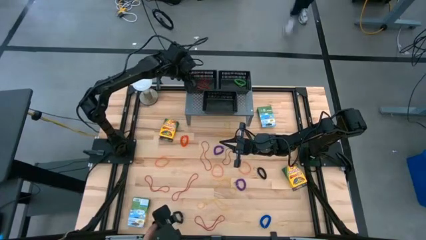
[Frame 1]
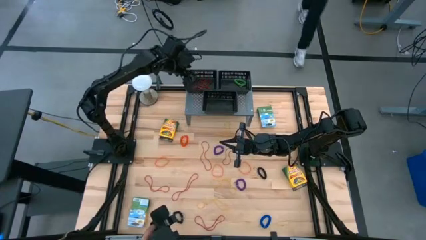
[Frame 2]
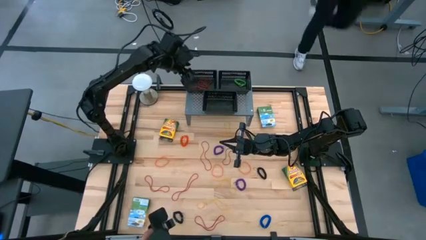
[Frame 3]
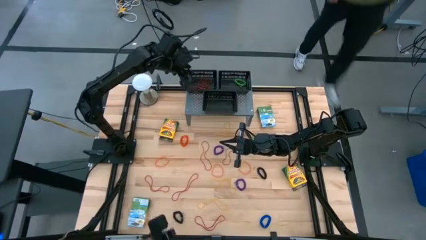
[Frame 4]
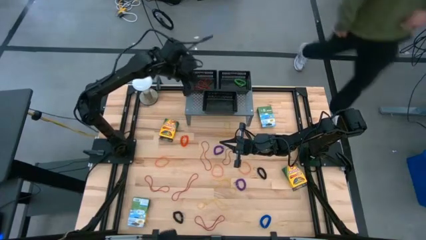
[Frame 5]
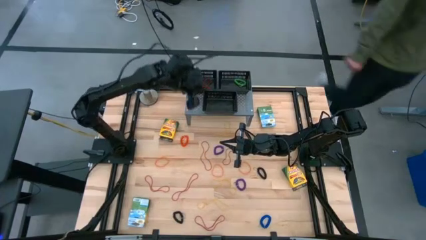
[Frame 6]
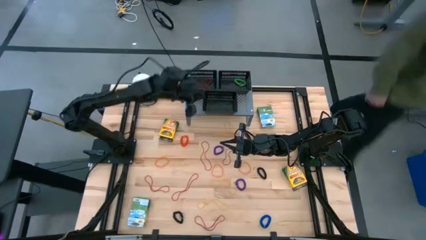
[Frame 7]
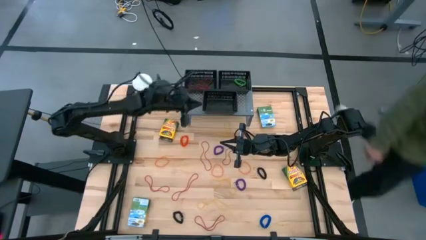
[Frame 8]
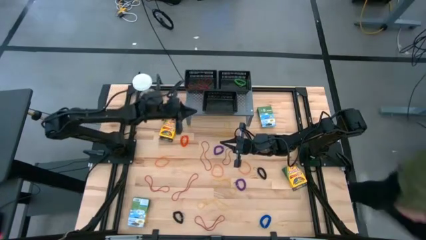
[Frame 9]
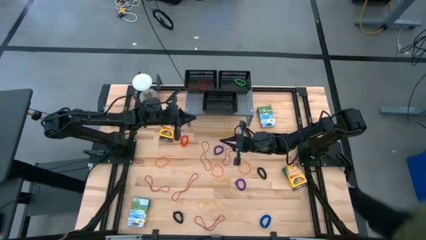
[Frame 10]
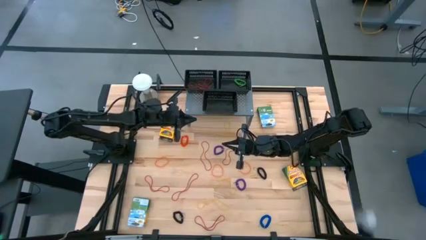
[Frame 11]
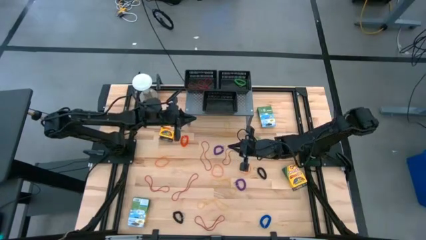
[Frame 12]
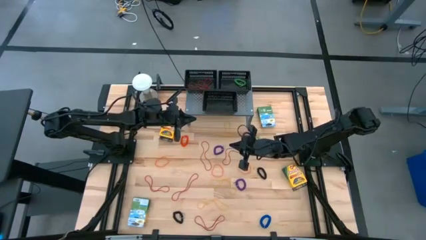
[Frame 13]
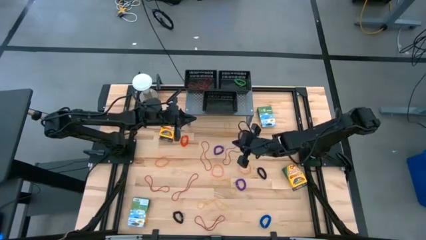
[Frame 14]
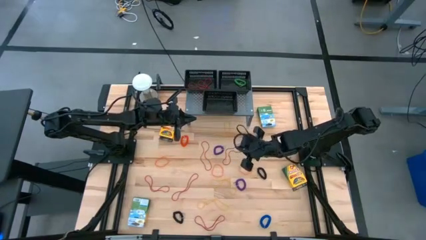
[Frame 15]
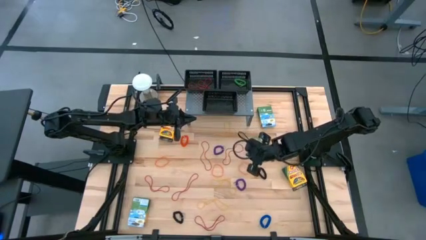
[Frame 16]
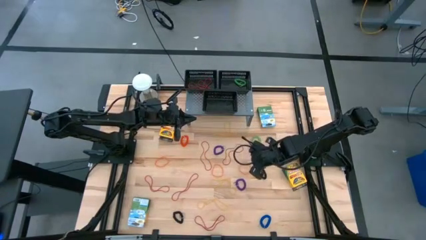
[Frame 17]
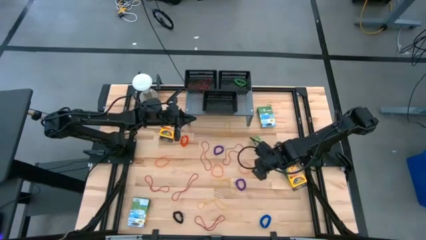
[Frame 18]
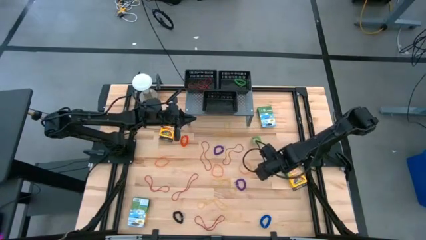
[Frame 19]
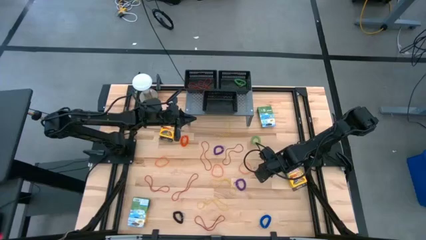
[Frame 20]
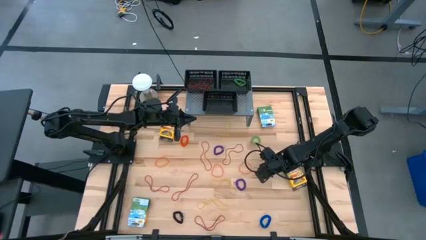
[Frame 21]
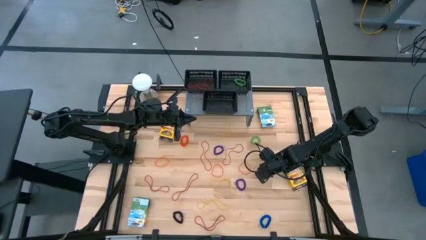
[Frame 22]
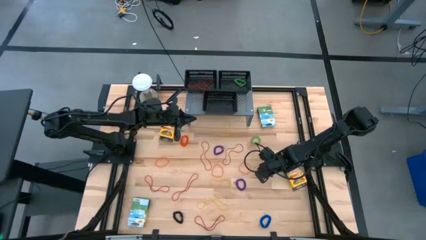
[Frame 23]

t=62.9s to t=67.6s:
Task: Pick & Place Office Desk Supplies
Put the black spring keychain into the top right black basket on the shelf

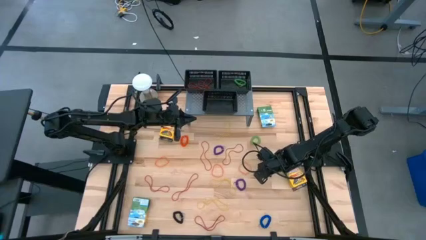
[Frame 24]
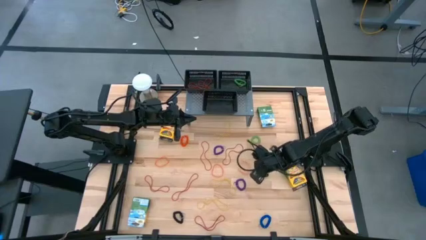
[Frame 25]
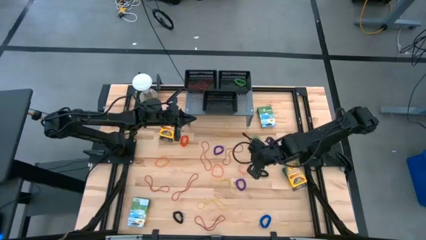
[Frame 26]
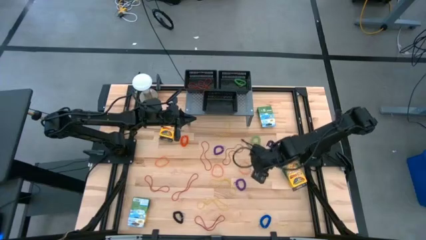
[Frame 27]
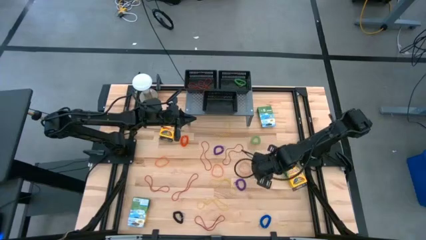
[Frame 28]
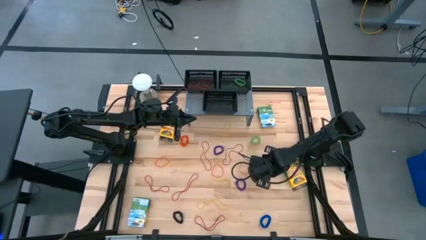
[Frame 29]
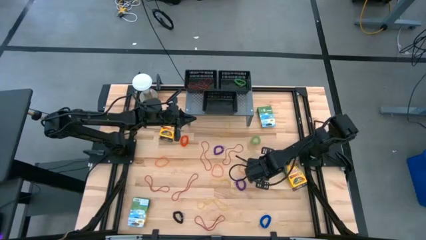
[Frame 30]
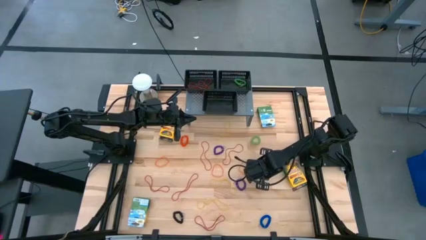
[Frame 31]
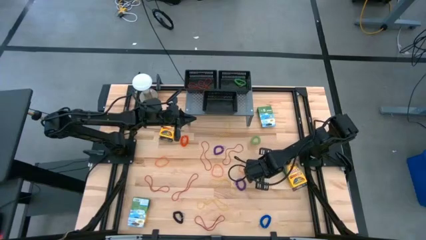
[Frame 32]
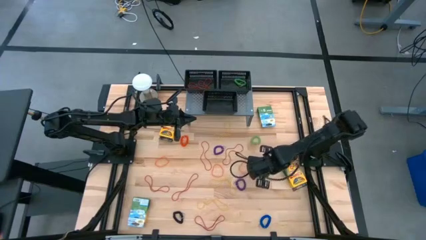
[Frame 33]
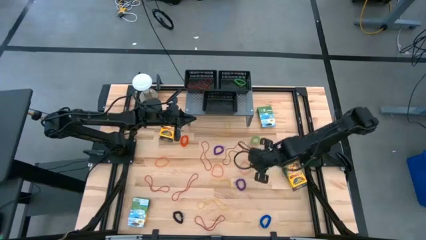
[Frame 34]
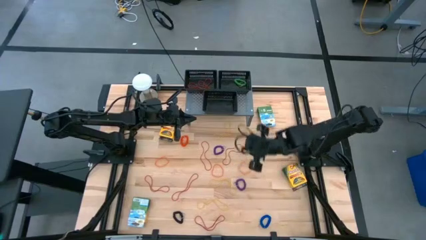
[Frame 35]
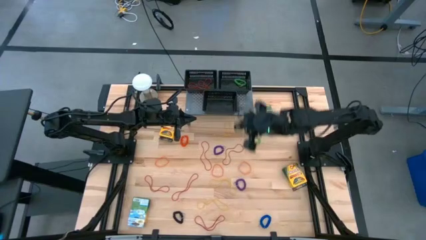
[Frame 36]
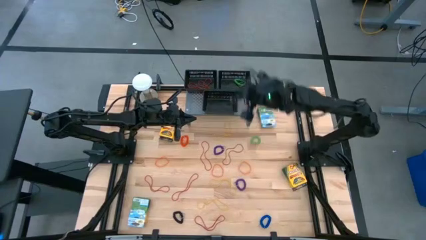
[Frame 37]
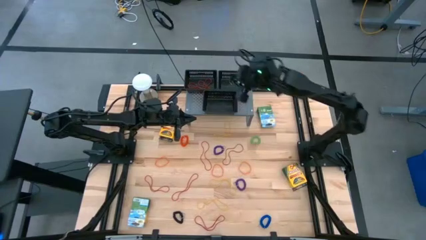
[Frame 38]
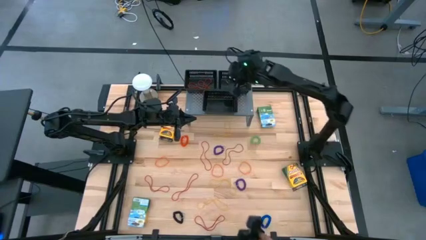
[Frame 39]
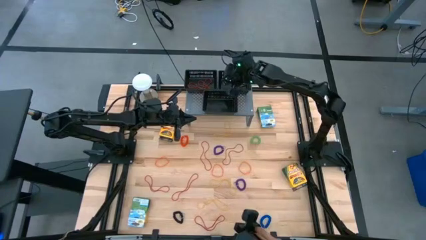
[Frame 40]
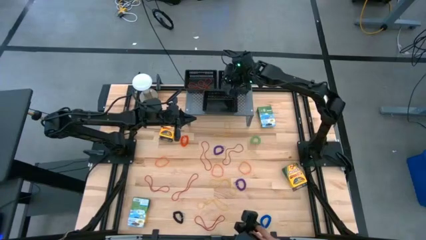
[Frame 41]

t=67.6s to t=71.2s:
Put the black spring keychain into the top right black basket on the shelf

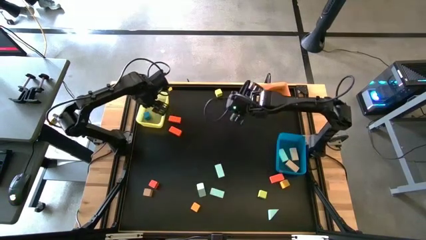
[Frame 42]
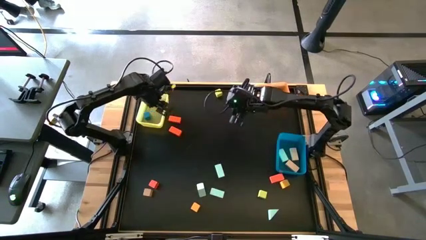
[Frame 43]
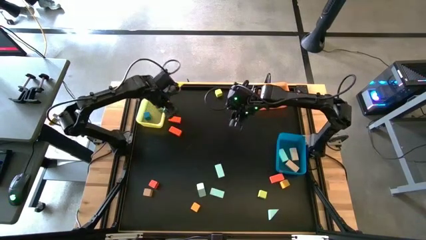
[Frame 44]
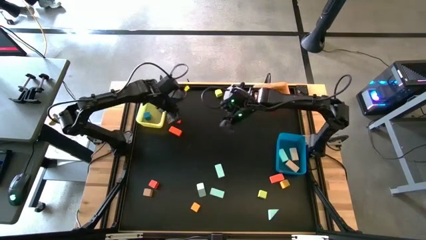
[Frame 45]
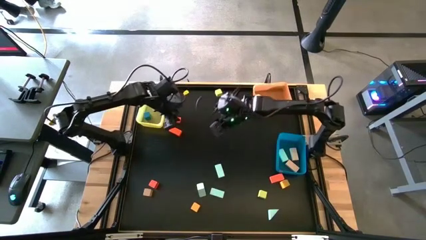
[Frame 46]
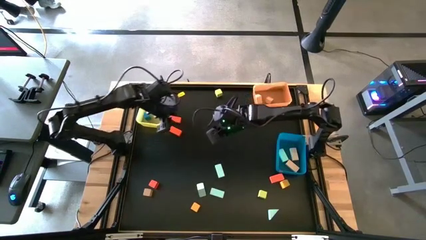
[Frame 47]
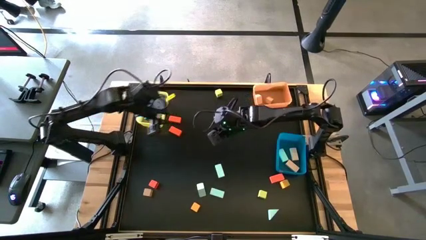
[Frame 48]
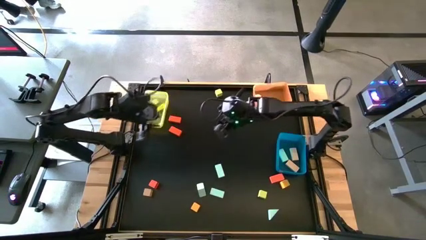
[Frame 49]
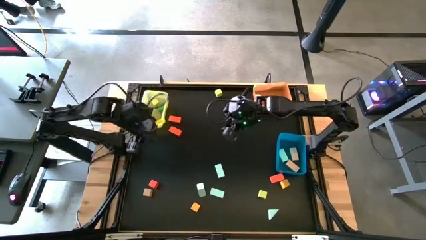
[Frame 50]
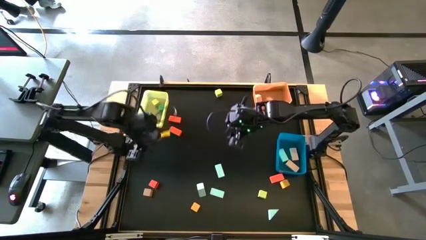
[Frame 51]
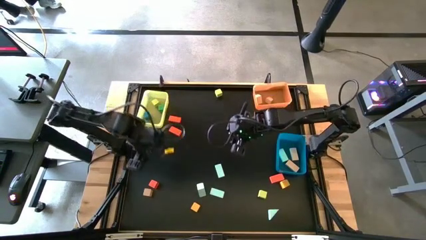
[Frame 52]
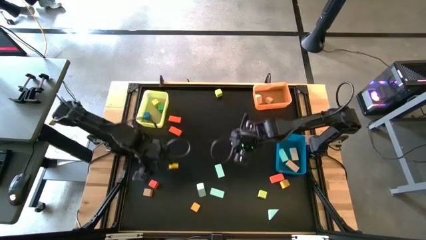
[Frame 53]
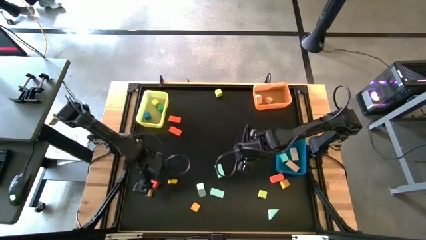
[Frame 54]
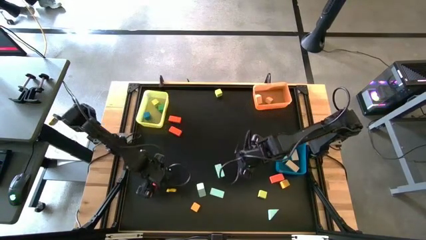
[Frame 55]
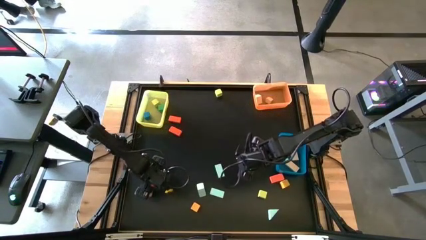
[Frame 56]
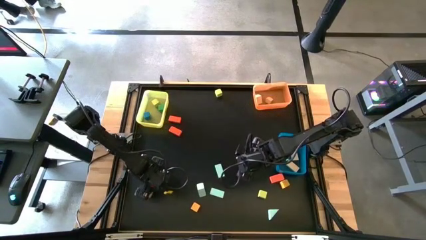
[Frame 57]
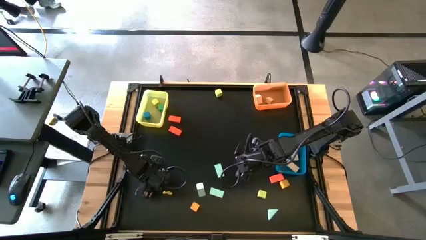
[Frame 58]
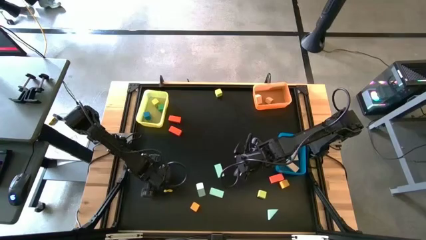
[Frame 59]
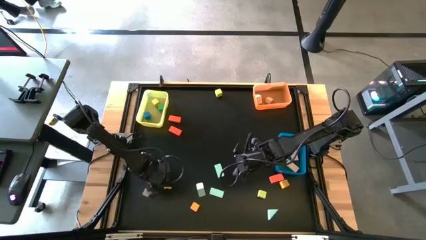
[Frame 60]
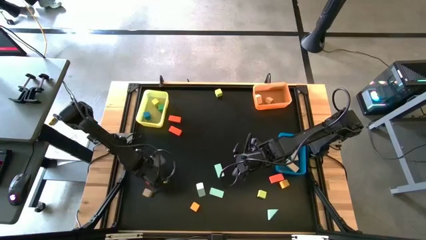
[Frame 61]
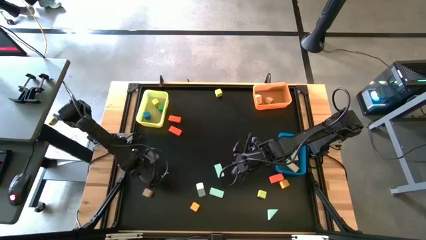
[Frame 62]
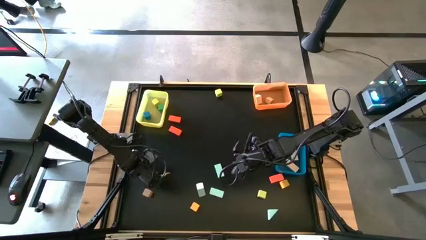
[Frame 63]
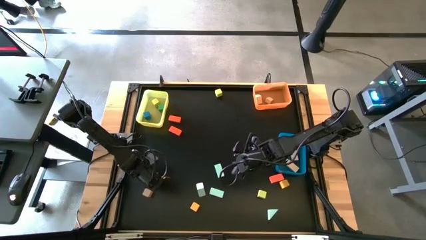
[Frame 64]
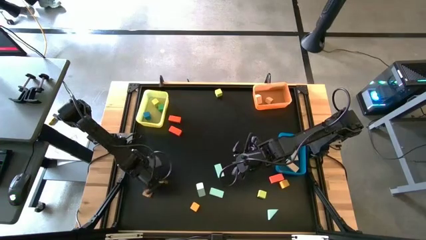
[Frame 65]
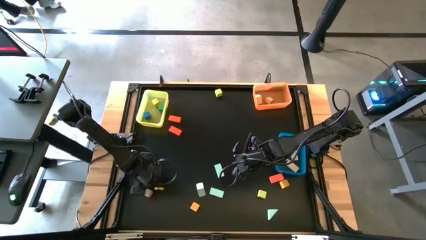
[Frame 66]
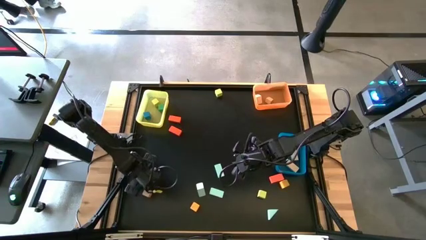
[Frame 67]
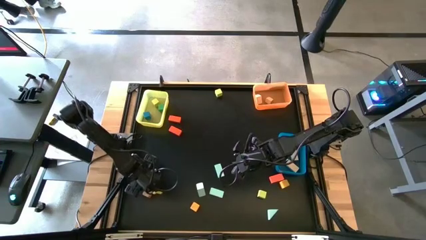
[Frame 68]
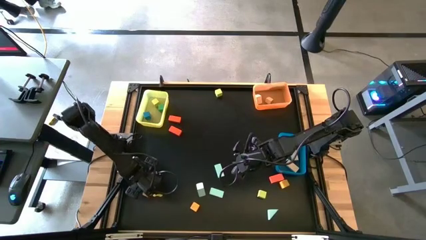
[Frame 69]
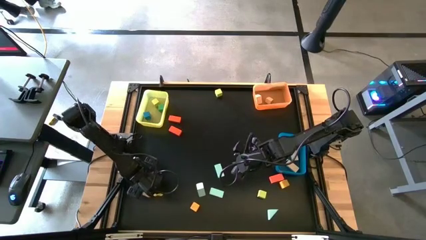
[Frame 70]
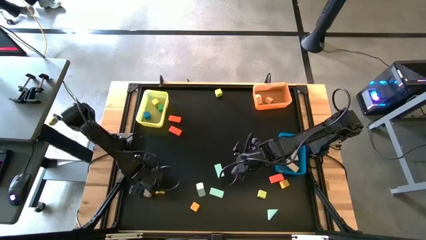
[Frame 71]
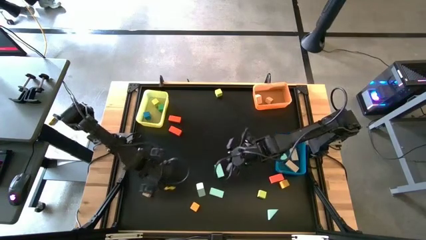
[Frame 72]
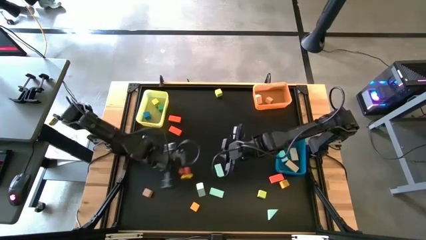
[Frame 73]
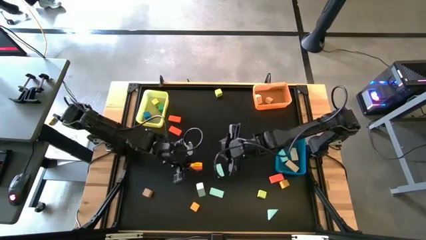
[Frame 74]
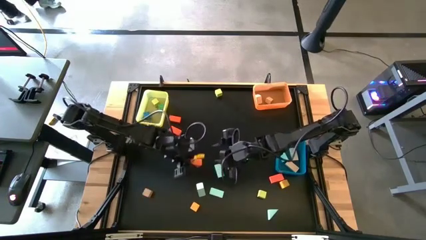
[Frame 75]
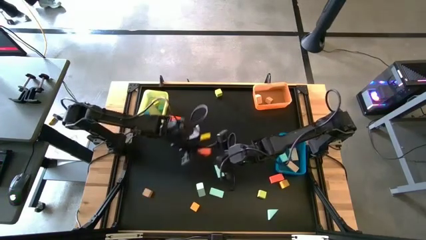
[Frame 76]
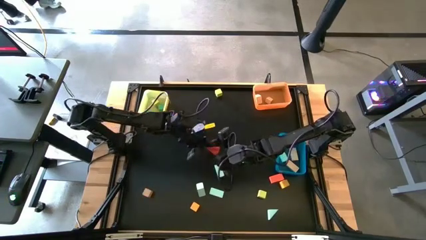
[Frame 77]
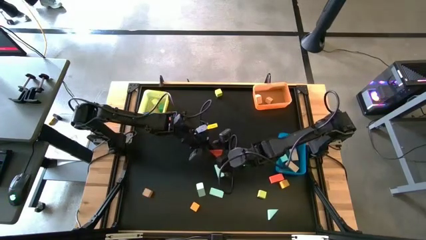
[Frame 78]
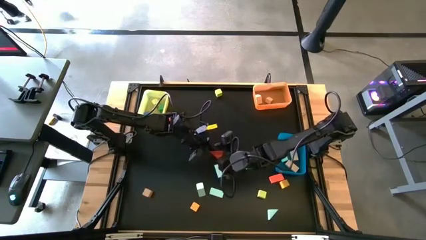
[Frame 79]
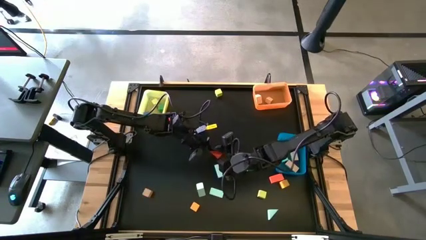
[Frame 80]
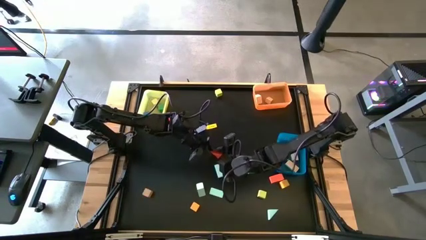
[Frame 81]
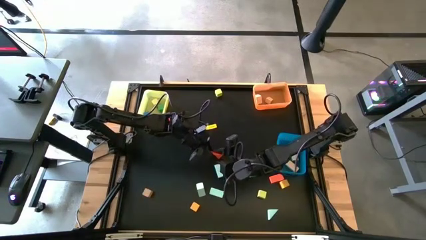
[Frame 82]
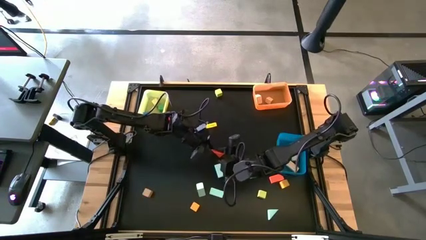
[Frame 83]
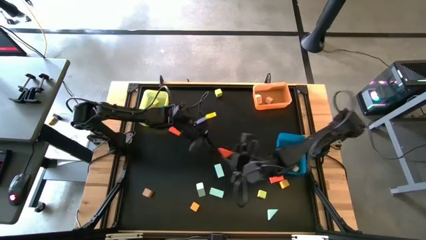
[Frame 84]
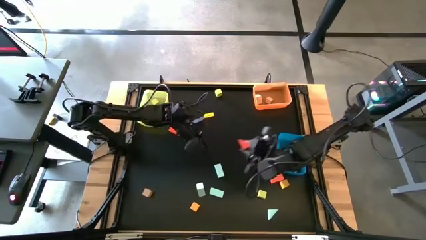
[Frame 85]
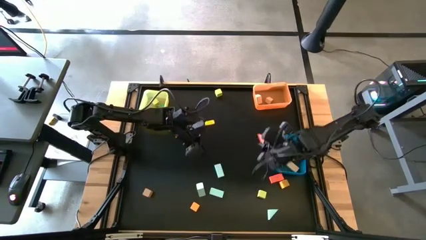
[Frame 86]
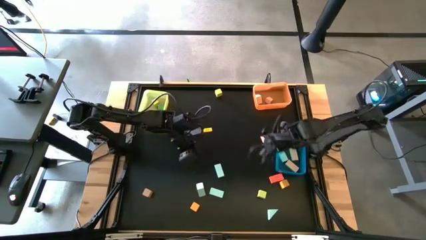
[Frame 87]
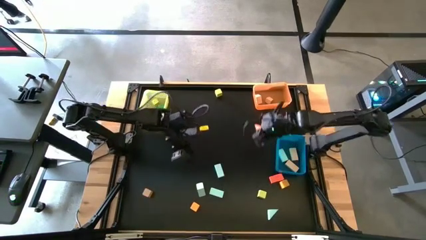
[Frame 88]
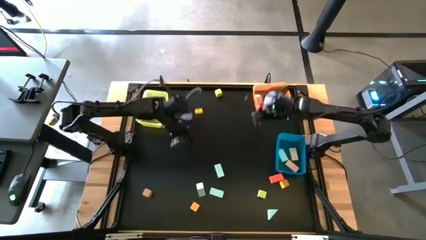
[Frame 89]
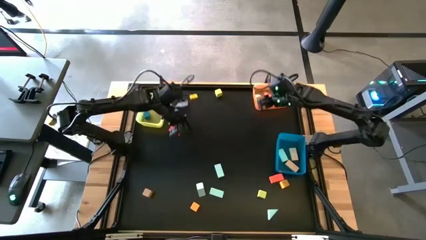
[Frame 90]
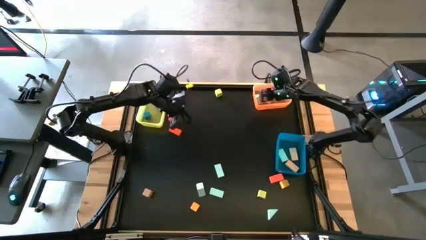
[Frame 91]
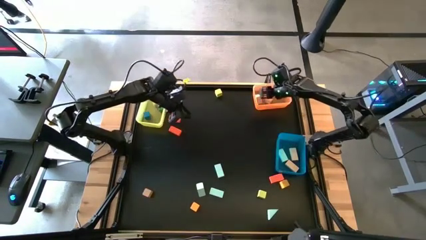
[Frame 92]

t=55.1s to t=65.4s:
Task: Sort blocks by size
Put the orange triangle block into the orange bin
